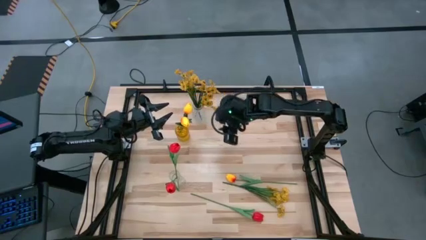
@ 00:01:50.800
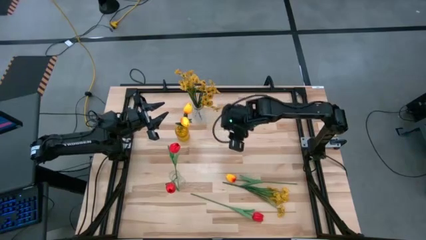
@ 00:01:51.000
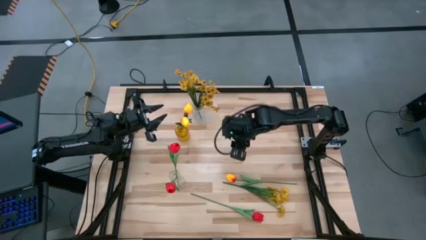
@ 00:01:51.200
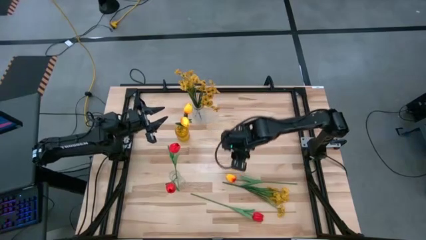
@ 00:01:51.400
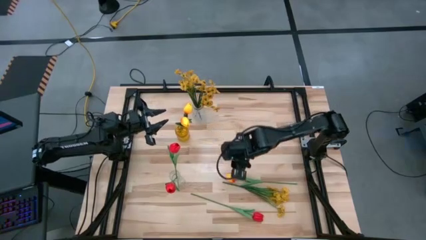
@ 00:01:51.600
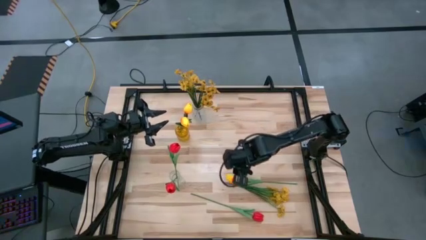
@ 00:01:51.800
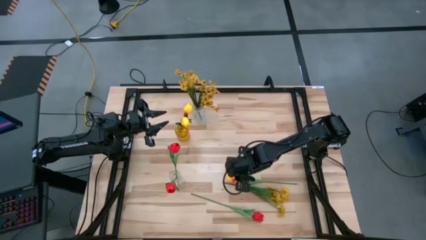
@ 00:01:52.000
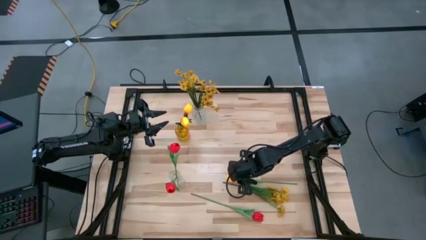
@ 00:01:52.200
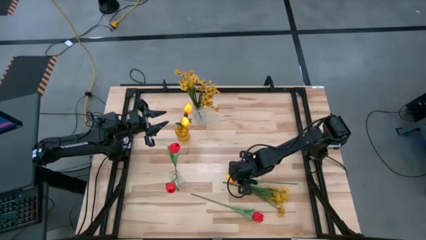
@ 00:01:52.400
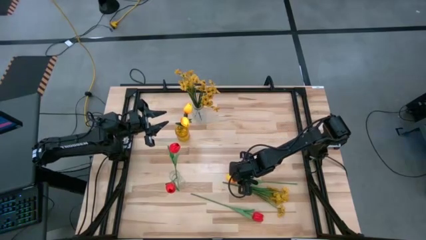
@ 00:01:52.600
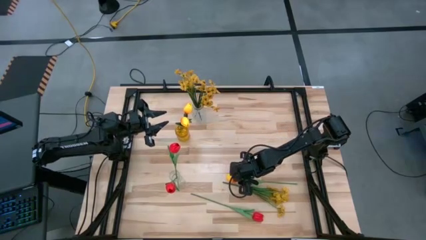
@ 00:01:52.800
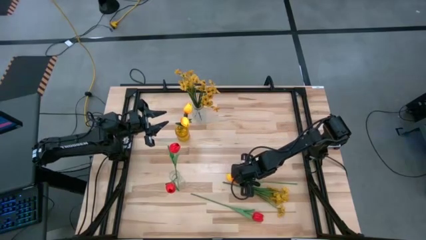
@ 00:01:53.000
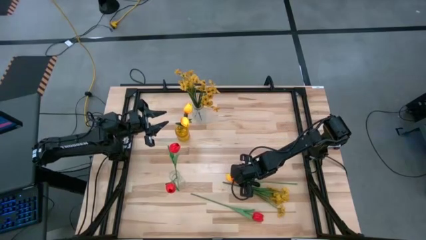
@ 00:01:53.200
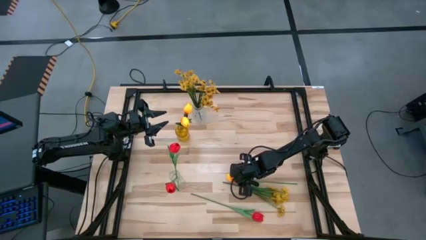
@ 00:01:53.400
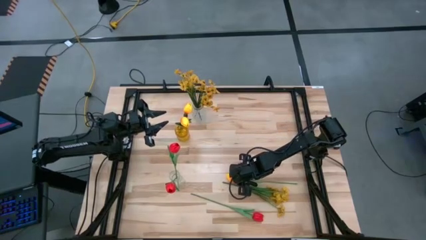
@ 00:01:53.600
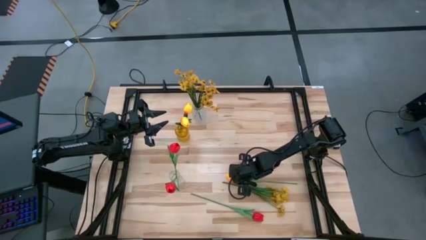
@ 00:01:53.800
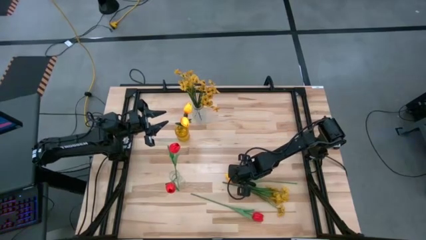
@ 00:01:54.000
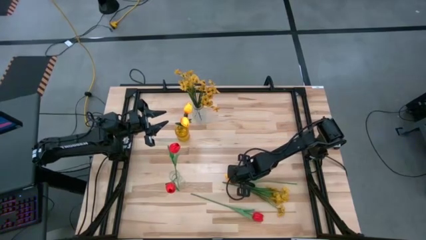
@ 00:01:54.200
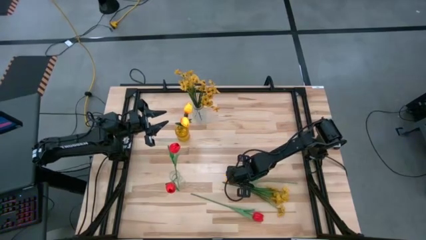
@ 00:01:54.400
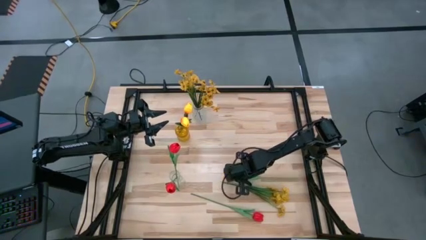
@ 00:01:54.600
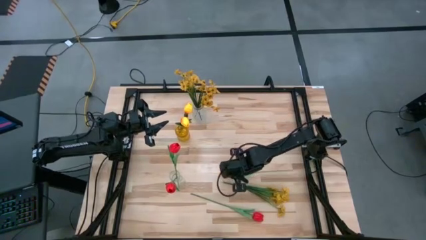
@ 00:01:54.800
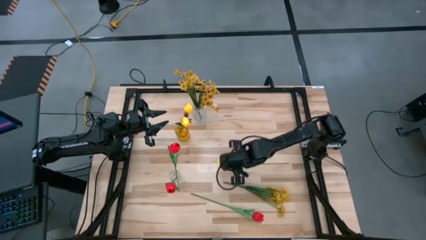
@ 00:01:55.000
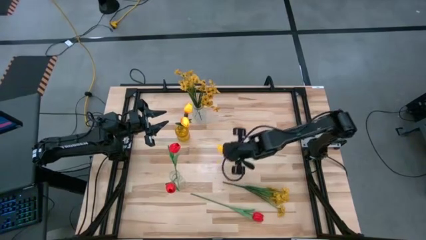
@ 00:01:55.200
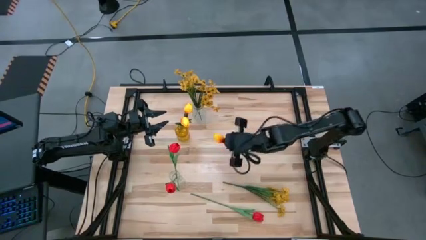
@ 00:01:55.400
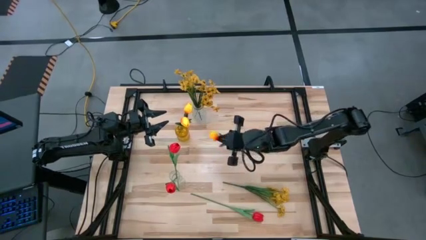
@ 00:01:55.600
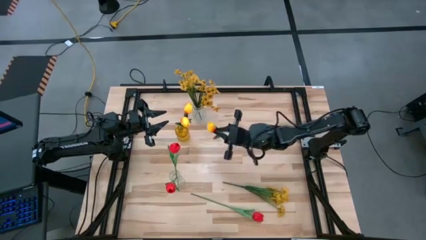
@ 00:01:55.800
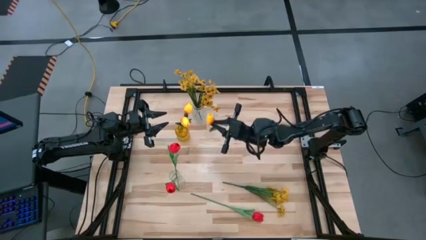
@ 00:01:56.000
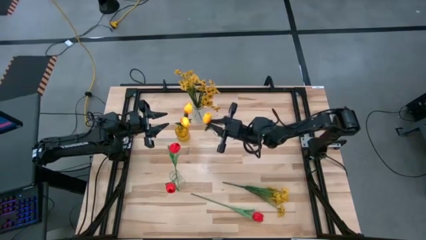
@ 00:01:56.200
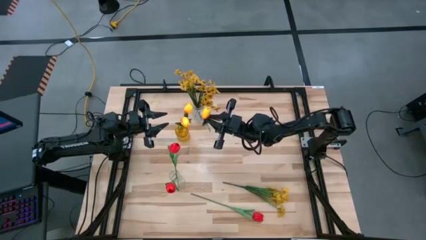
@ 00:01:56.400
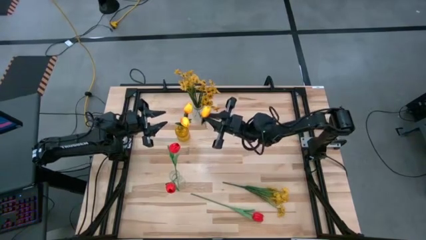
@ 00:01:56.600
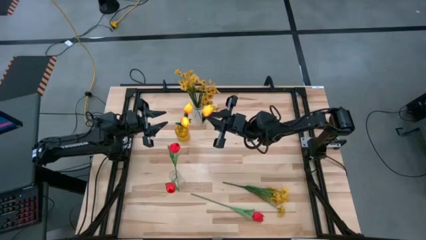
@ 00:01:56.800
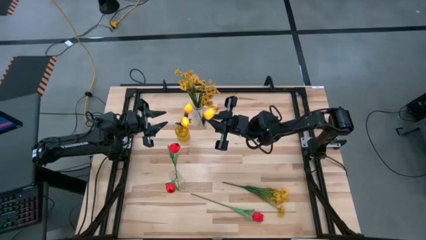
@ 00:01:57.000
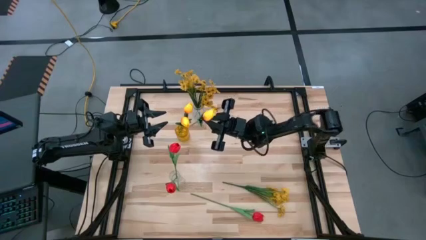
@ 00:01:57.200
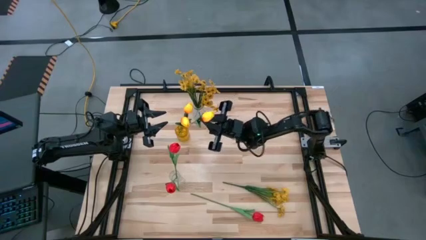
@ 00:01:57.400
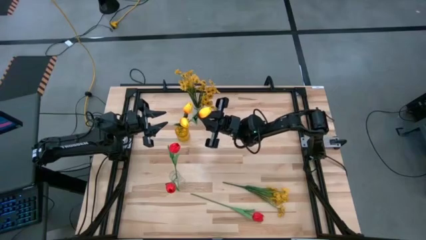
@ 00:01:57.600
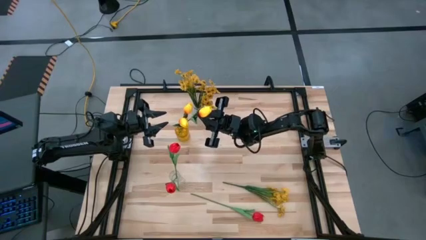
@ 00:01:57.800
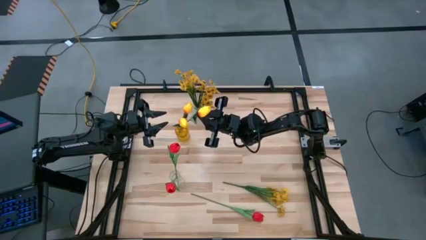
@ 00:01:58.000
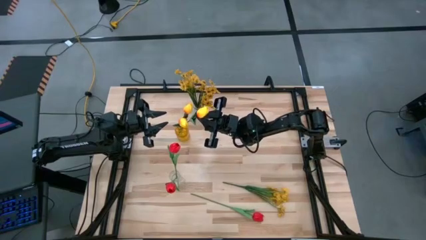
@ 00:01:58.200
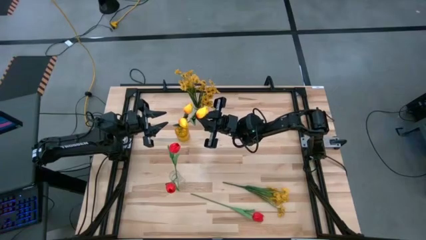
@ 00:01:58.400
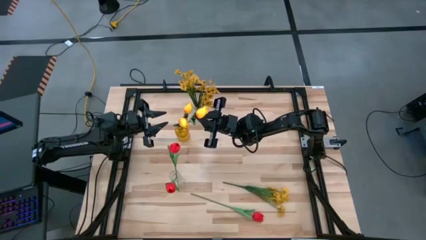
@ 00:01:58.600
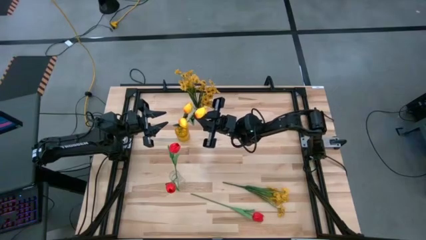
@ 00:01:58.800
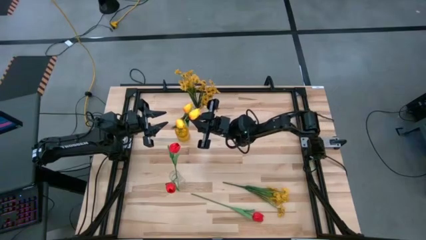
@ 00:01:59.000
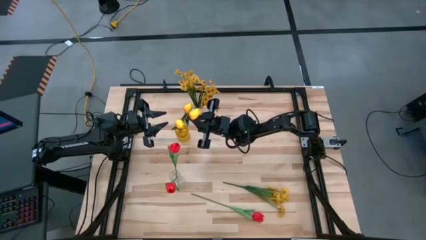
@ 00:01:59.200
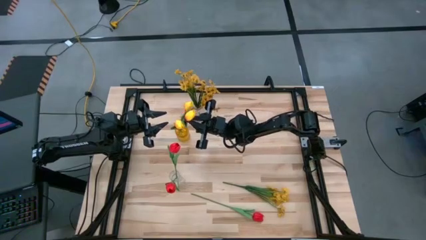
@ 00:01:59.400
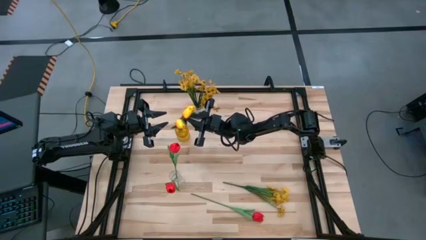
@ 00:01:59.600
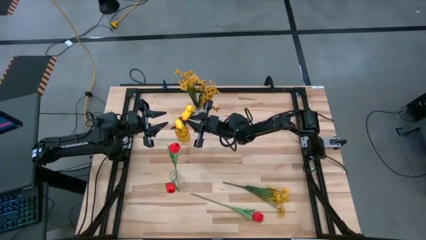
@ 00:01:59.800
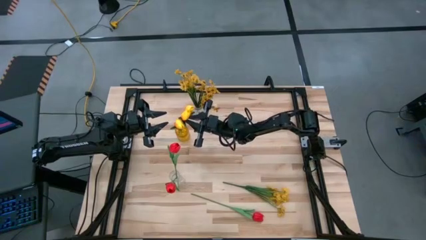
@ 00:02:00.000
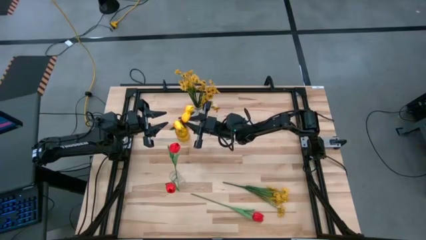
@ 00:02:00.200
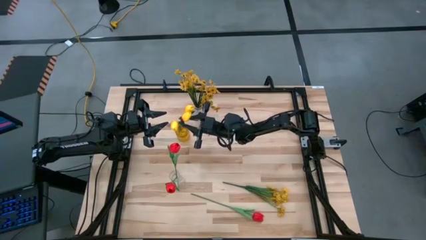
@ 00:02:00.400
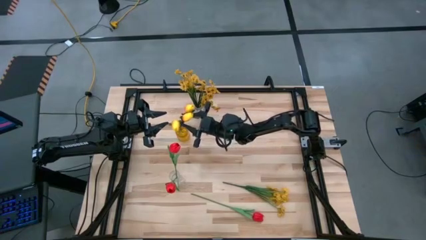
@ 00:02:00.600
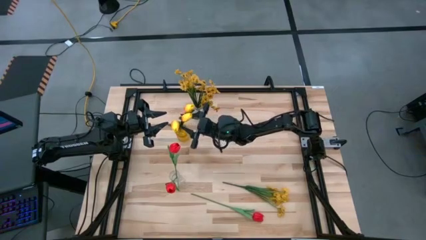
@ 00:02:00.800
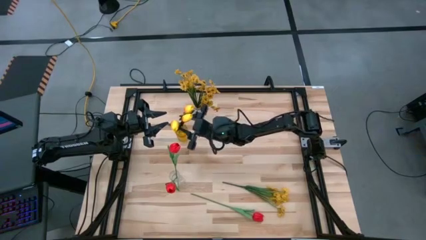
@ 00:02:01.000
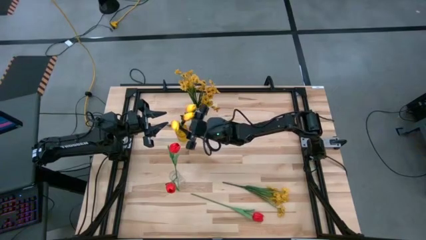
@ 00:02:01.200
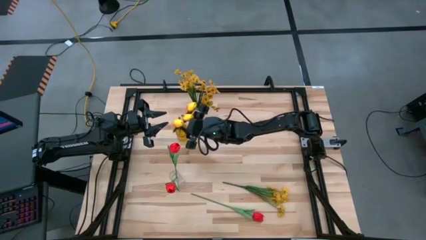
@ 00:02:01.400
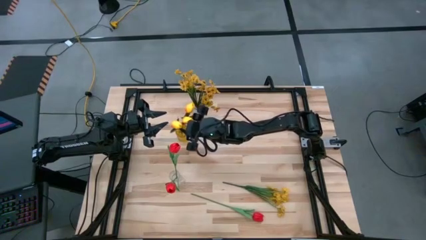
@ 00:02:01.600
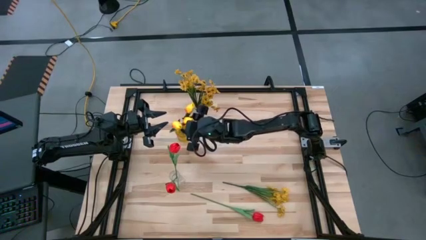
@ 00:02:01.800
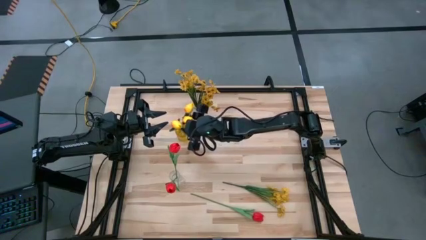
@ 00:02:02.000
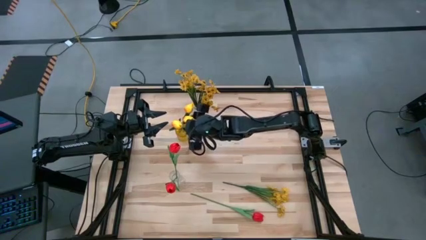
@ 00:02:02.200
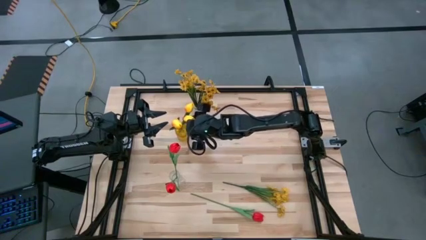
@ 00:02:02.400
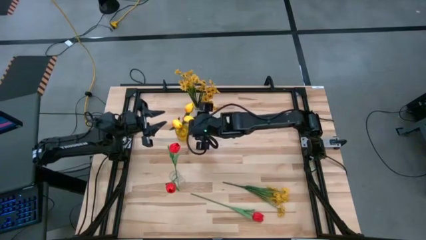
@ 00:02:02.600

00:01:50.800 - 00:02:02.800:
Task: Sort flowers into vase by color
Put the yellow tulip into the yellow vase

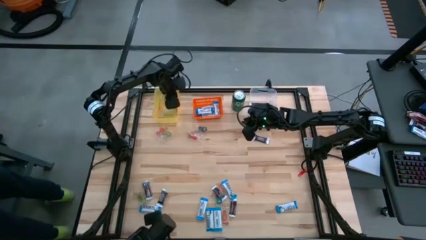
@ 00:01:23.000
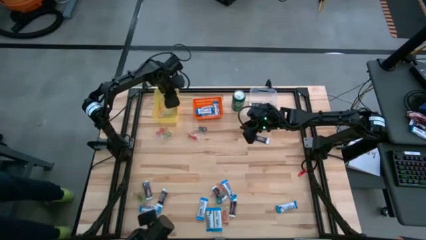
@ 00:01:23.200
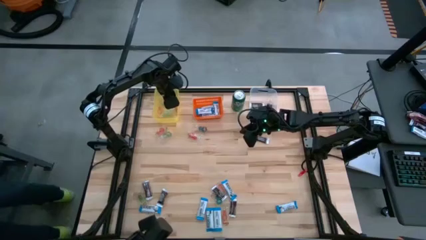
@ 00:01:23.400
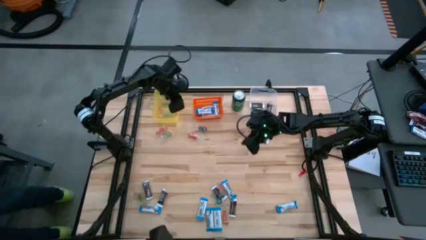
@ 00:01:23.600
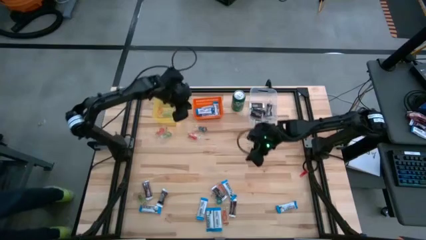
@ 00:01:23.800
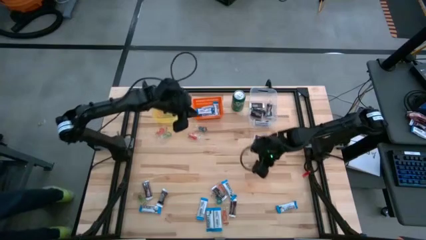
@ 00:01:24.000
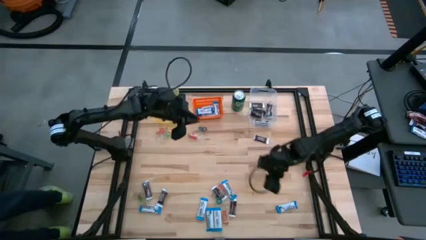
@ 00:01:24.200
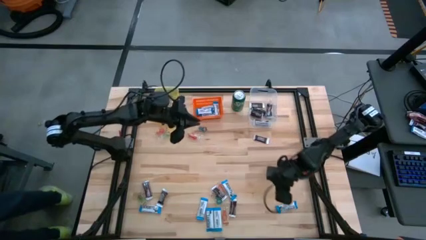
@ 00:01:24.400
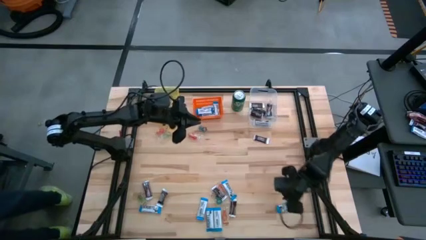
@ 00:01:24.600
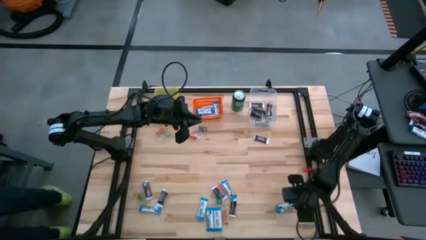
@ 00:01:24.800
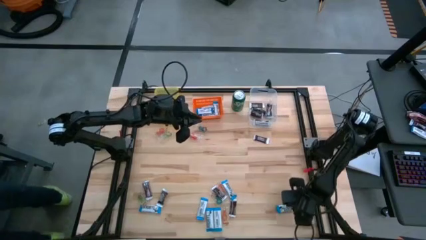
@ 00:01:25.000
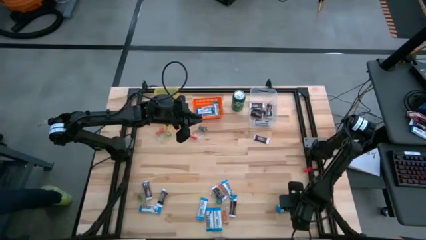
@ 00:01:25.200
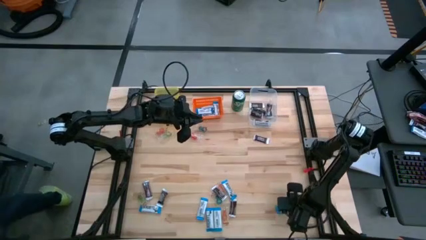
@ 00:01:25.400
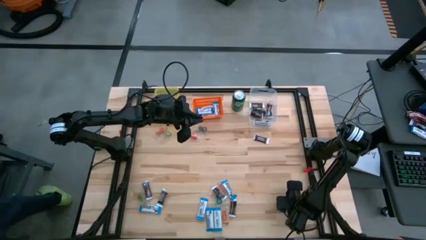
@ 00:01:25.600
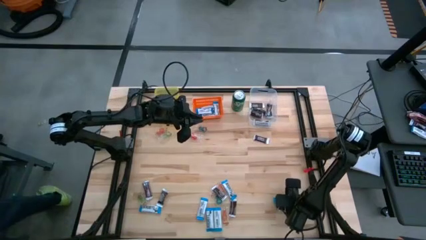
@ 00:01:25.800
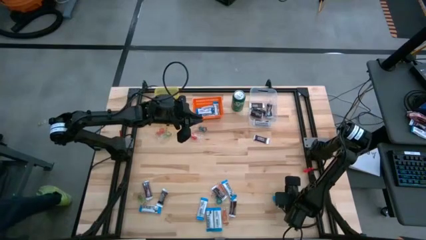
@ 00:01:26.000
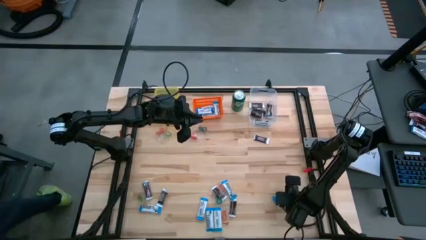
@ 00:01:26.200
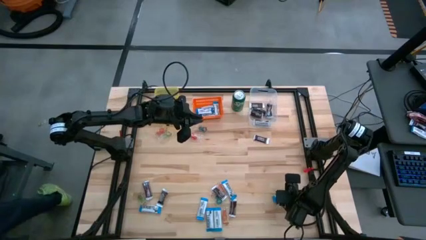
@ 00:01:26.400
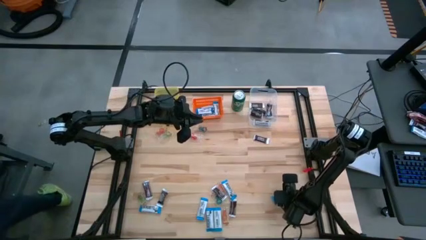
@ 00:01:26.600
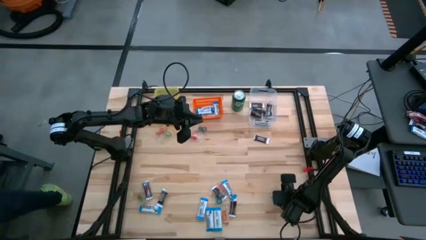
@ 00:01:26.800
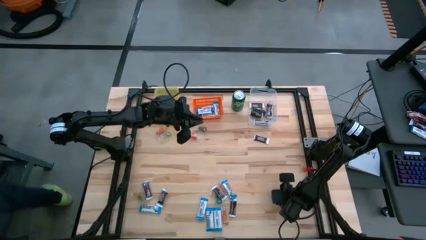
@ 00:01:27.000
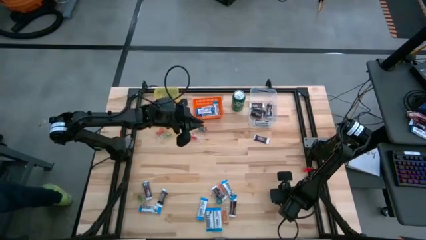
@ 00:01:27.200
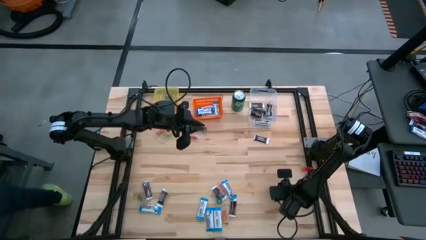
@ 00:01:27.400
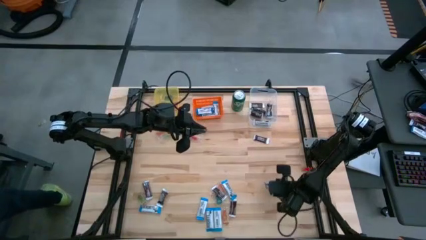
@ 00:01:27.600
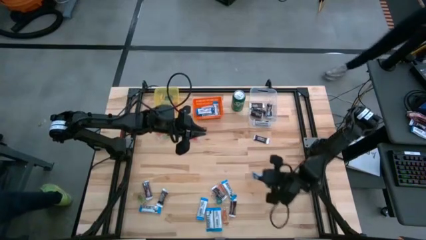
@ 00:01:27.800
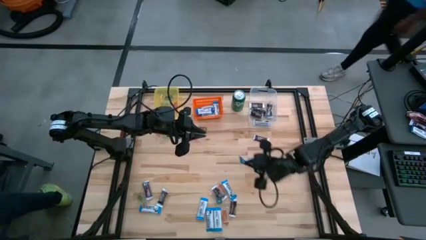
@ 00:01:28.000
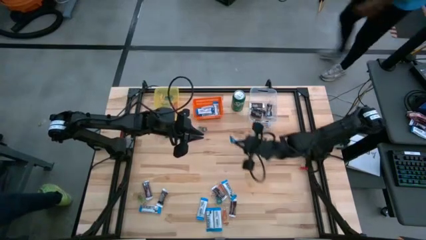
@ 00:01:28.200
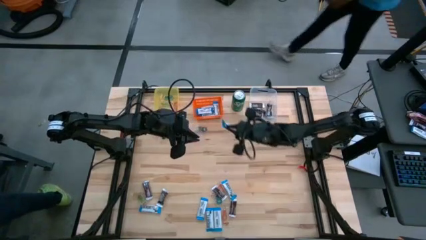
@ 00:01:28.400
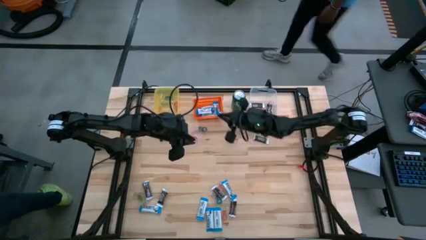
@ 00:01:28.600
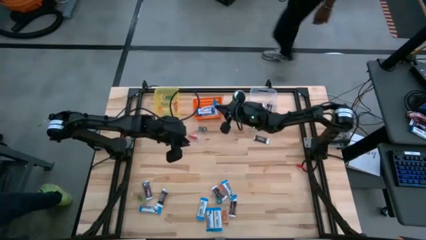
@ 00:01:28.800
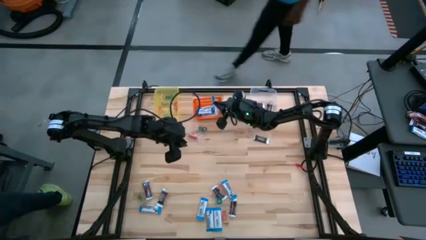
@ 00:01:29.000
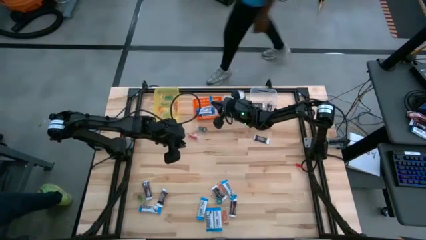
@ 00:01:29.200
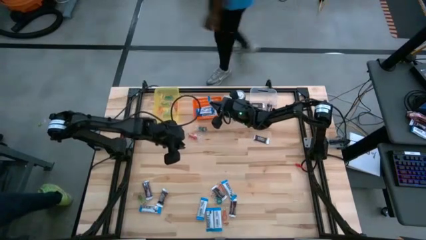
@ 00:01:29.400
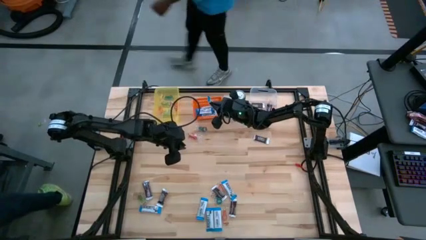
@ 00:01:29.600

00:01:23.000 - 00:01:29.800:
Task: Organize candy in baskets
Put the white chocolate into the orange bin
